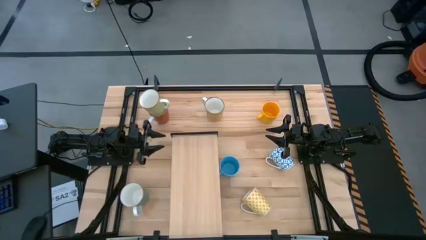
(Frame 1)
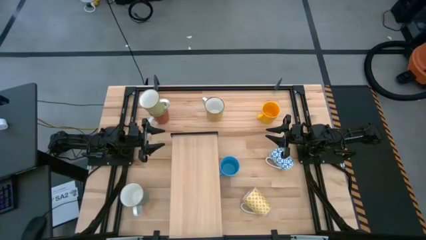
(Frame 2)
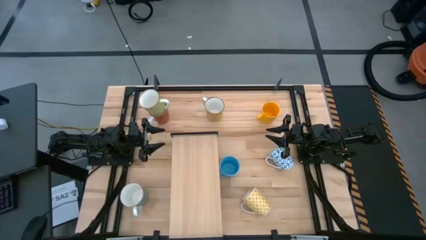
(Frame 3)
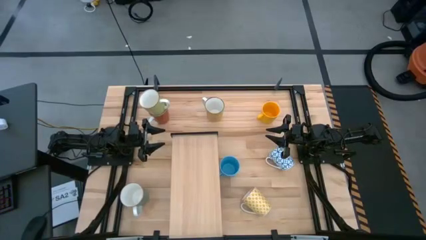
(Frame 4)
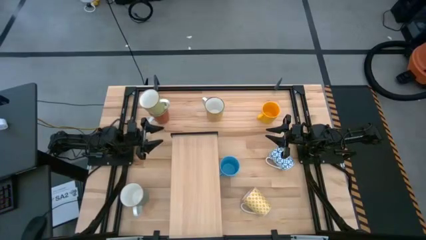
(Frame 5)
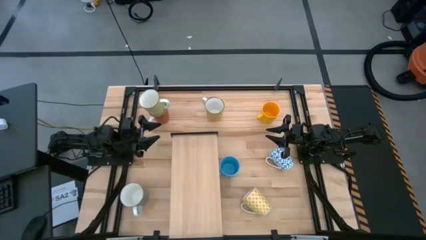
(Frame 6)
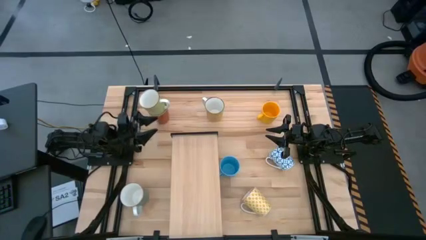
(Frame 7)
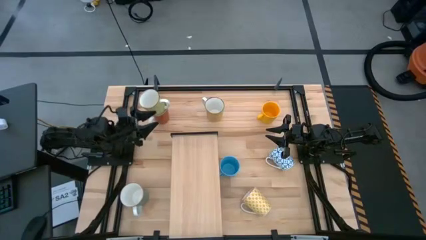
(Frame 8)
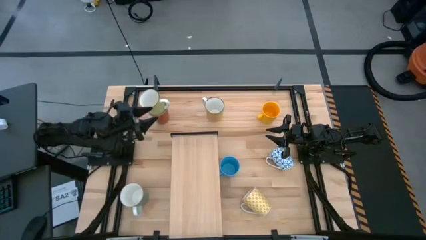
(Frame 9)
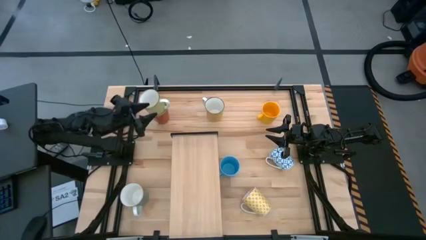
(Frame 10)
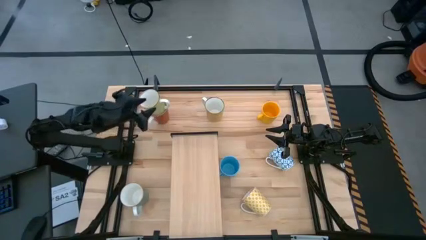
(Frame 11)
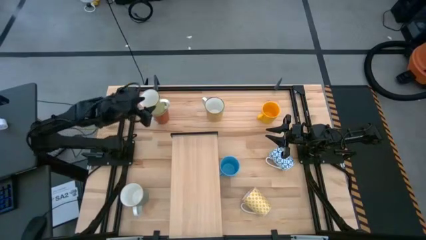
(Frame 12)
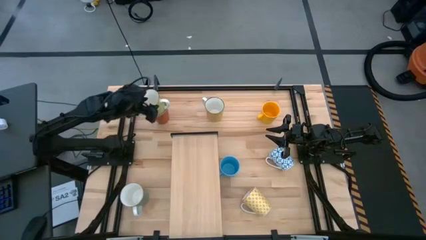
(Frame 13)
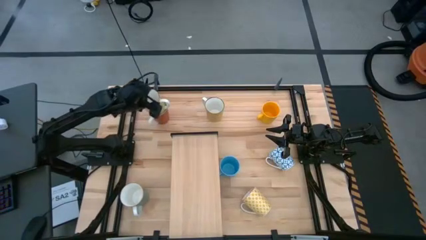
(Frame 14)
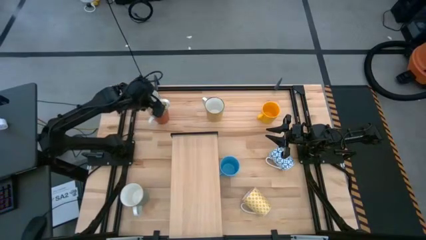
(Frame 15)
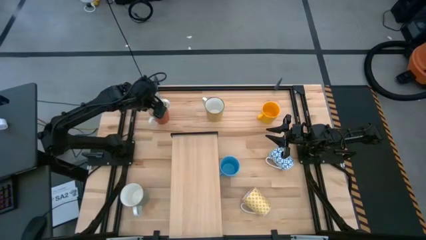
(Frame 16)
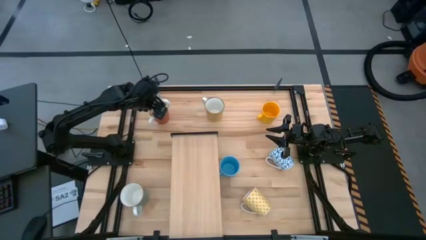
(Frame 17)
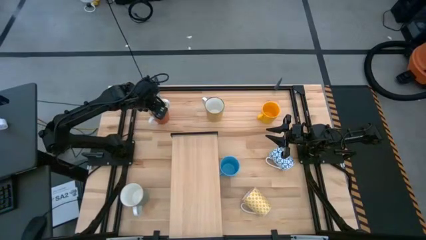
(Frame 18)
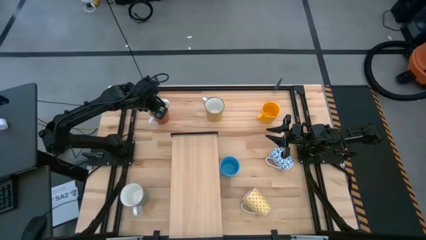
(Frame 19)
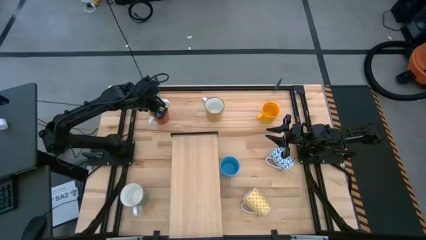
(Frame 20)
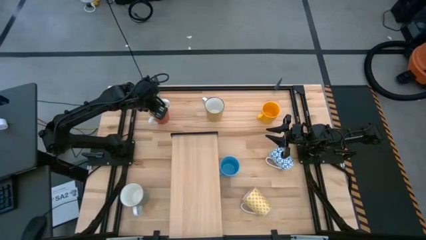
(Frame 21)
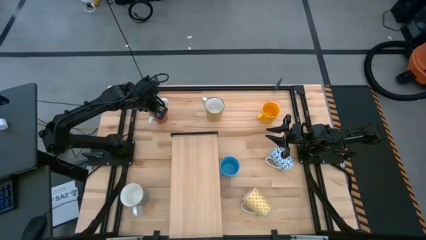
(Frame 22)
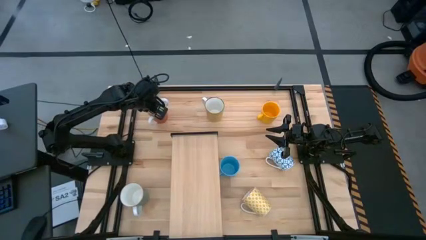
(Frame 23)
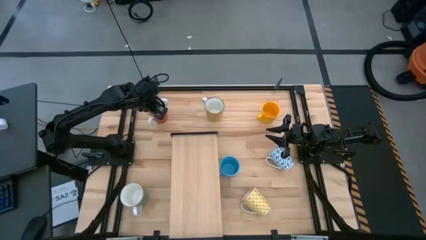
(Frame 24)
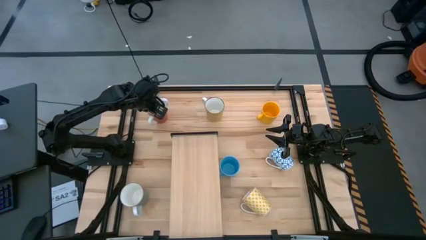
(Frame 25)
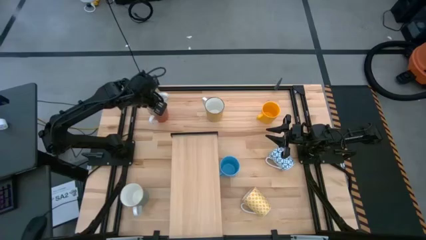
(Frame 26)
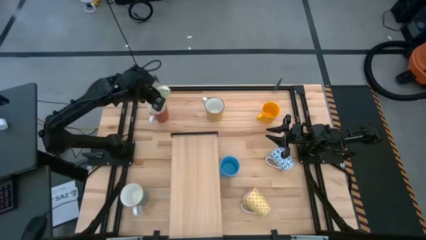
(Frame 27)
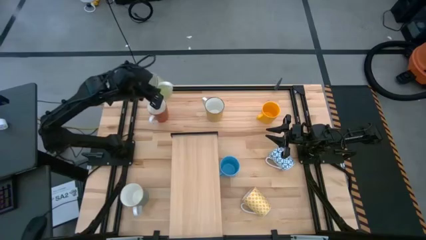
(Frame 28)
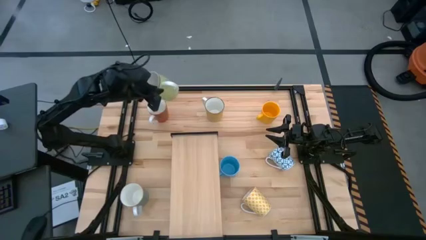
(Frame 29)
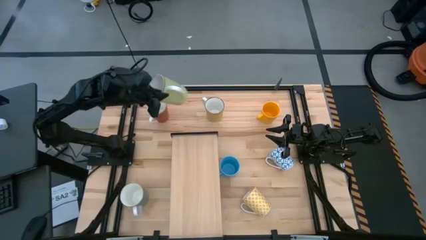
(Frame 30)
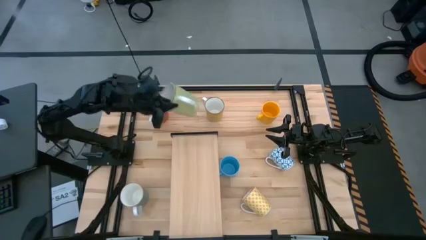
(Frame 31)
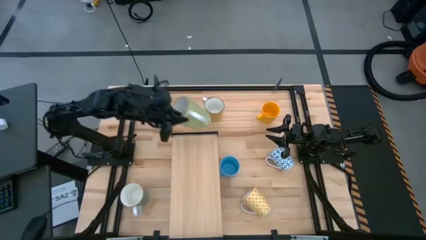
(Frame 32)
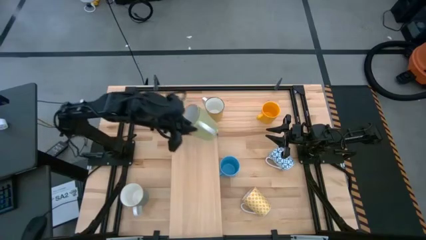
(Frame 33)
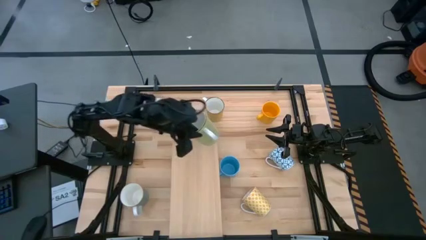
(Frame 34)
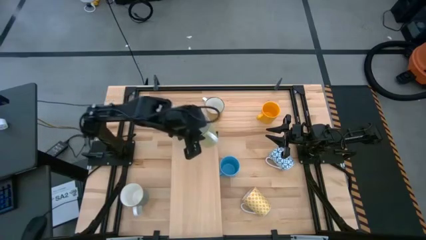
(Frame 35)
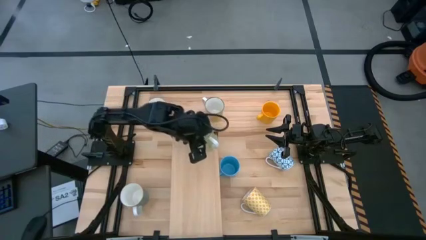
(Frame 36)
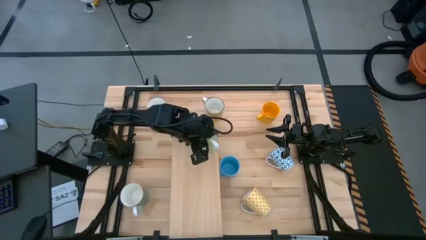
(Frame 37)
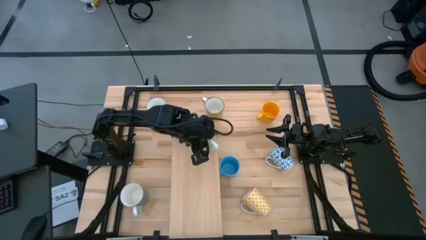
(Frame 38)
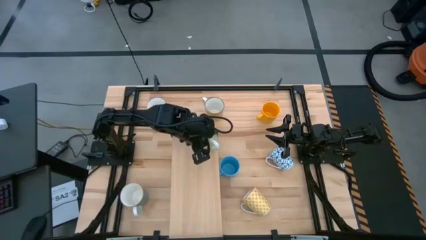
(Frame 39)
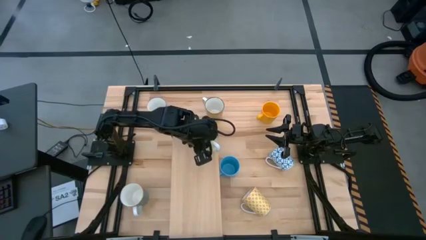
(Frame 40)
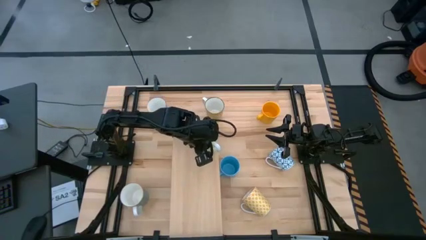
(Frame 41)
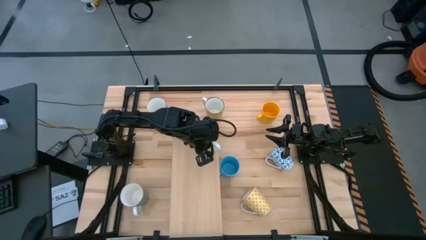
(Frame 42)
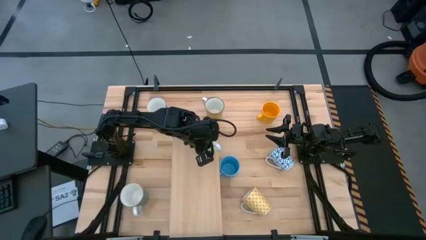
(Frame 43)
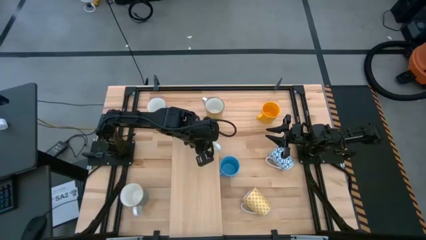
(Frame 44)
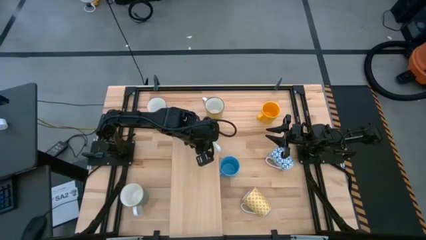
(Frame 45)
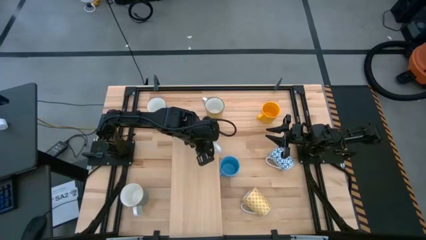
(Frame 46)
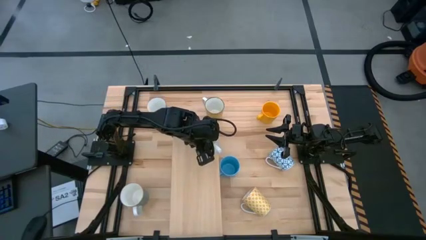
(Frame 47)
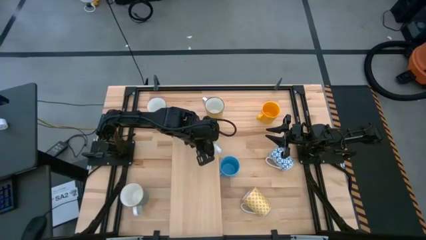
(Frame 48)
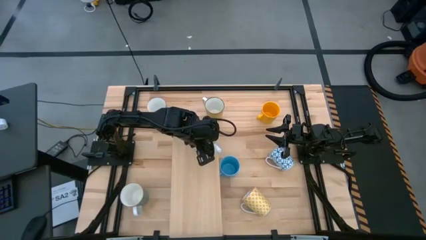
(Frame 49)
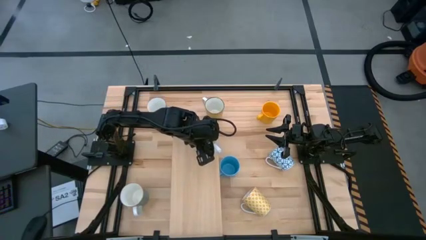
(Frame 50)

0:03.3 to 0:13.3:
Task: Place coffee mugs
Put the light green mug on the shelf

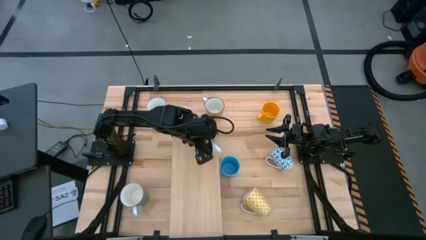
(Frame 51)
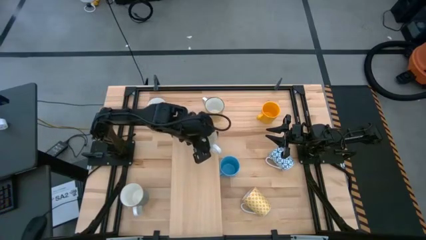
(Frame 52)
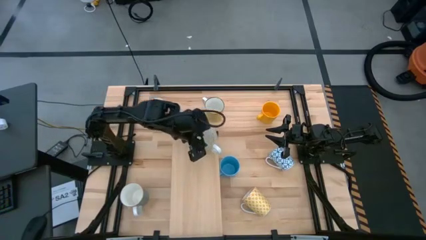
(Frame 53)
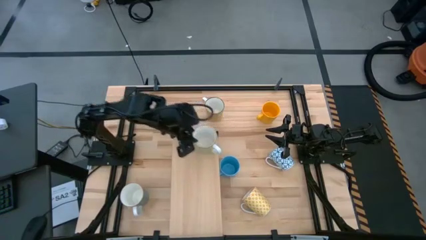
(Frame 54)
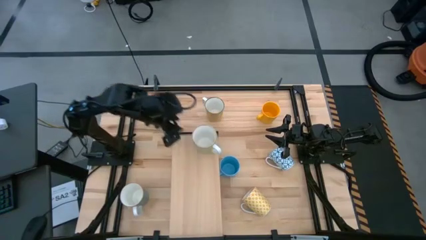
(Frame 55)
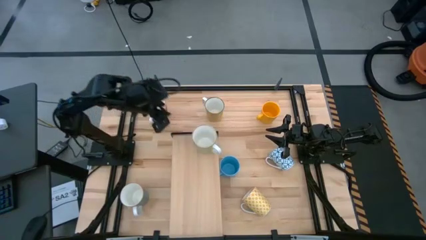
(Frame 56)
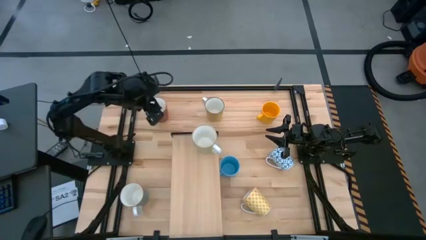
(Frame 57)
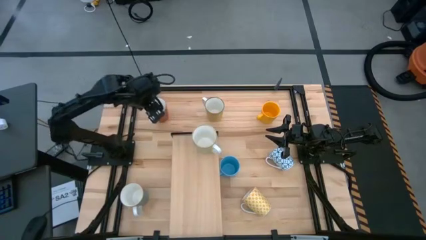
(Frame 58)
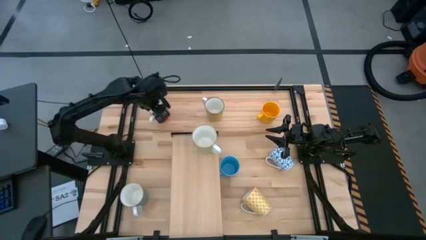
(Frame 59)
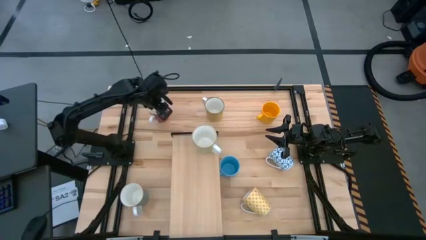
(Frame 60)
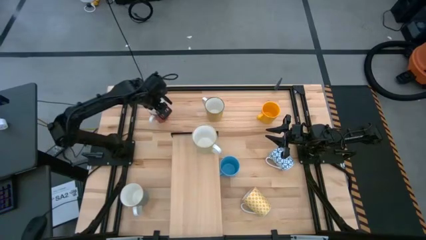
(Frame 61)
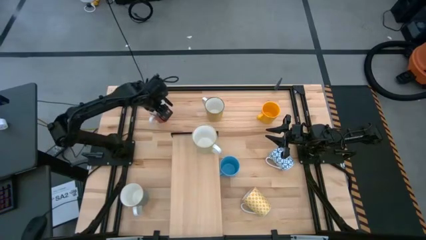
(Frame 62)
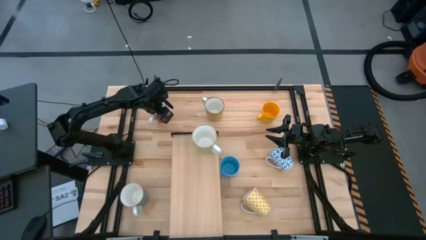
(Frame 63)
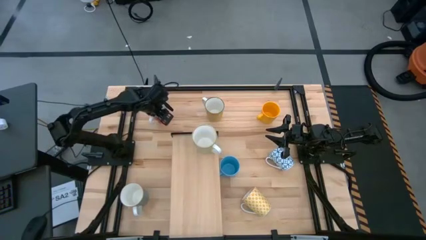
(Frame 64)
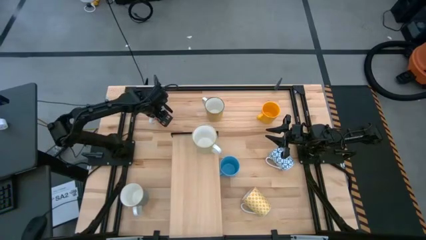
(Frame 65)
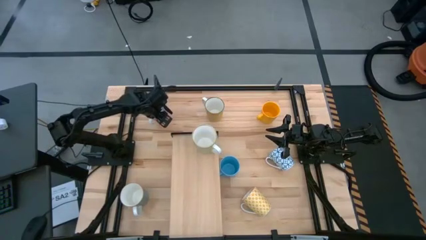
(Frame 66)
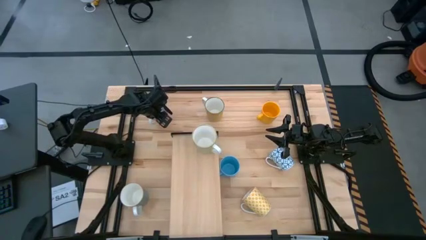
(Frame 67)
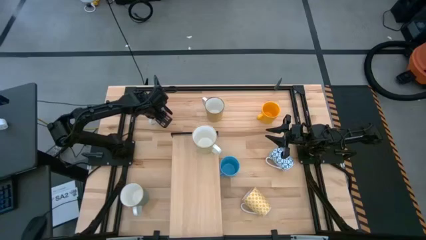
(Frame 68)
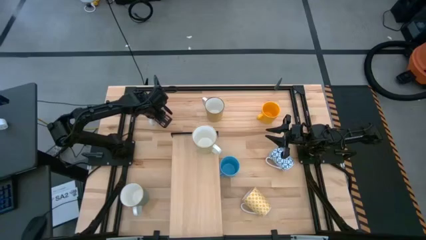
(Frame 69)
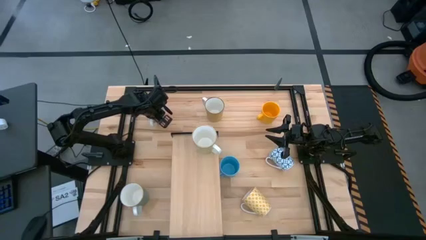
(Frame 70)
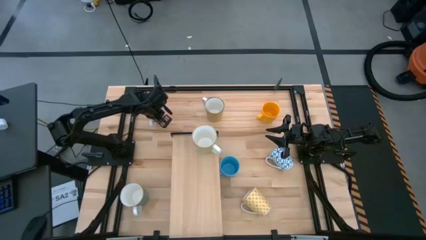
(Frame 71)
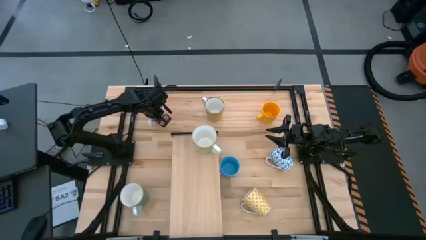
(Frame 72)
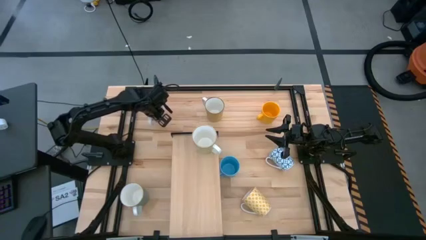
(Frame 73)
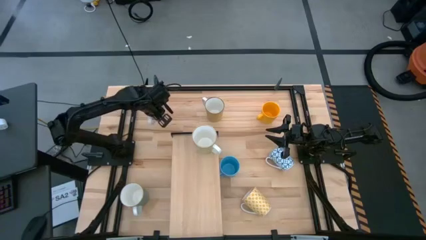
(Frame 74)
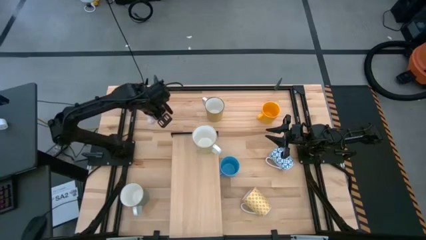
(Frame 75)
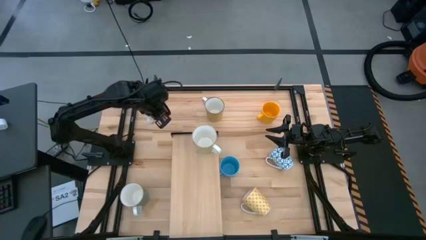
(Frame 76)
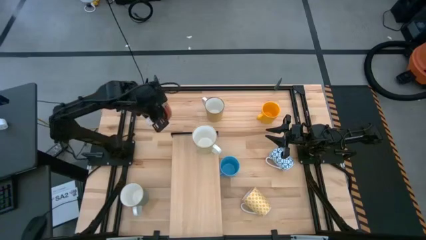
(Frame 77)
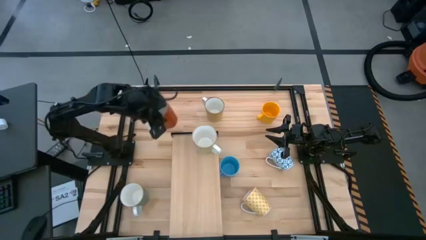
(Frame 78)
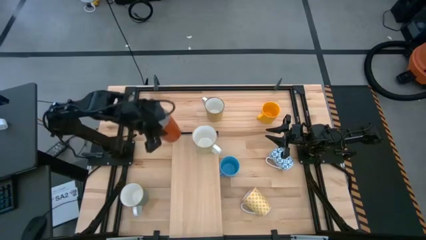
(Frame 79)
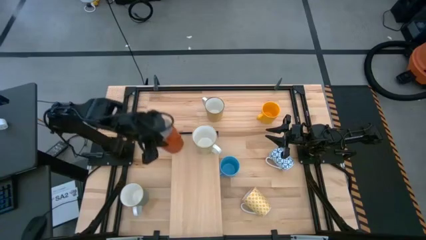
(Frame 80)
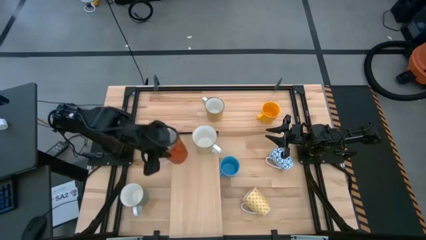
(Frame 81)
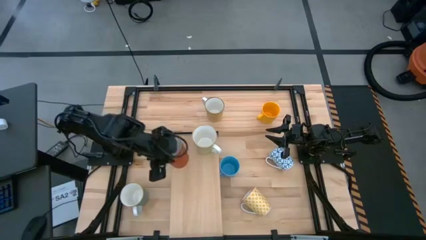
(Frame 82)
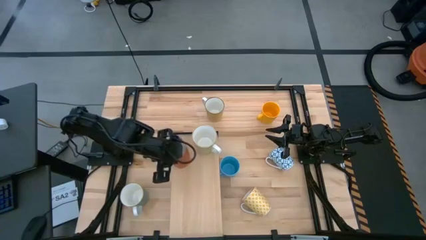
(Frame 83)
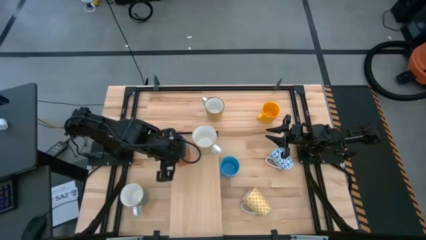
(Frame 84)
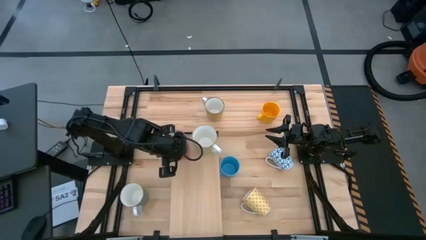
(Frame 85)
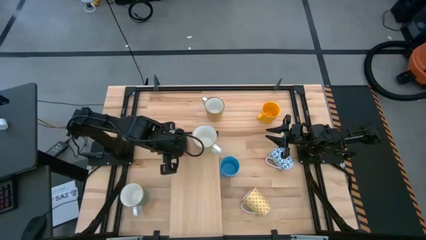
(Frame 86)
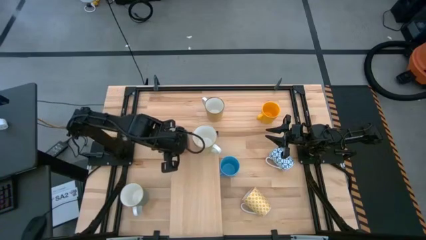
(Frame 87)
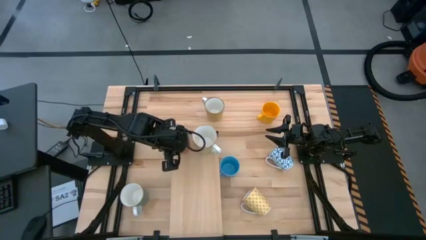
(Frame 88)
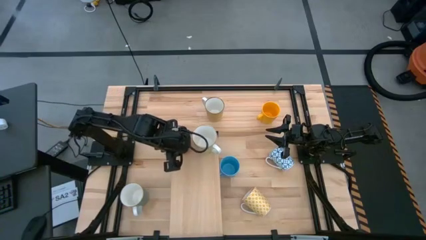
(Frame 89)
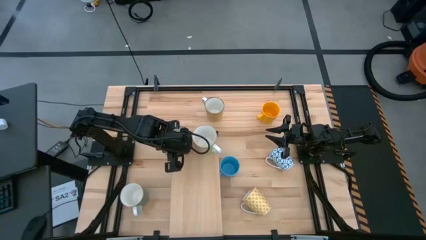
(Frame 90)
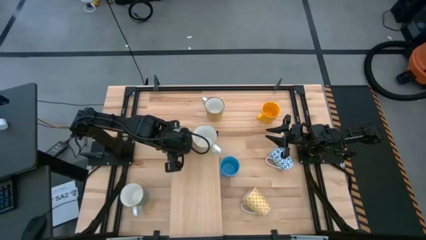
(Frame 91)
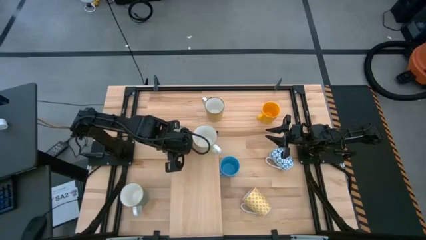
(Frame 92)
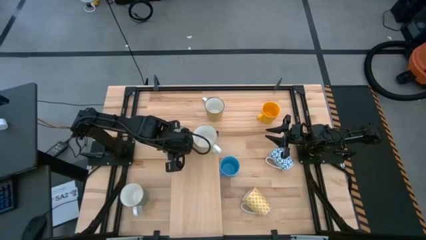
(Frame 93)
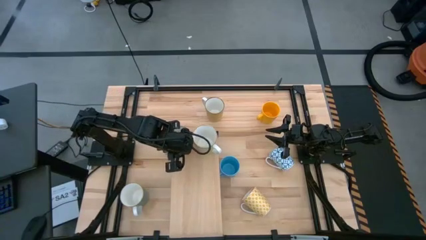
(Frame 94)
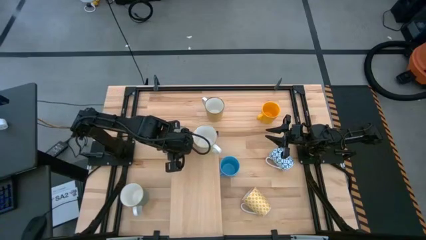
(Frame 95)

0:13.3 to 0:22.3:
Put the red mug on the shelf
